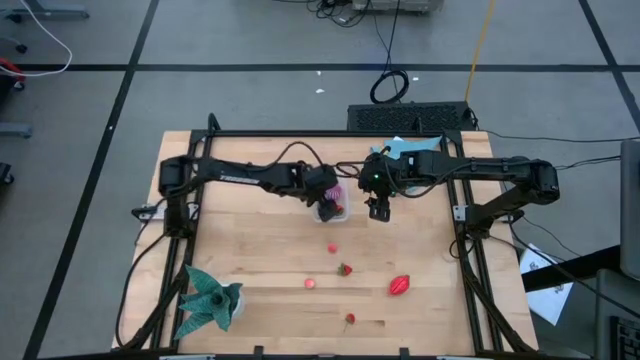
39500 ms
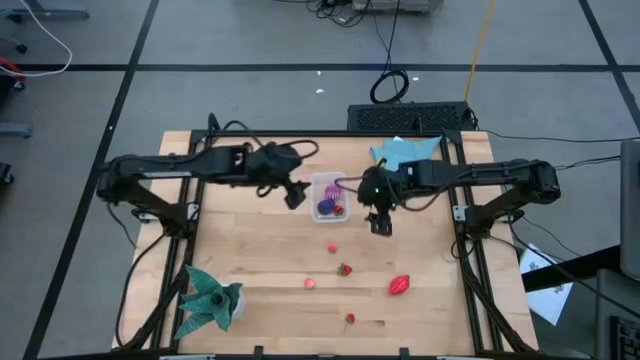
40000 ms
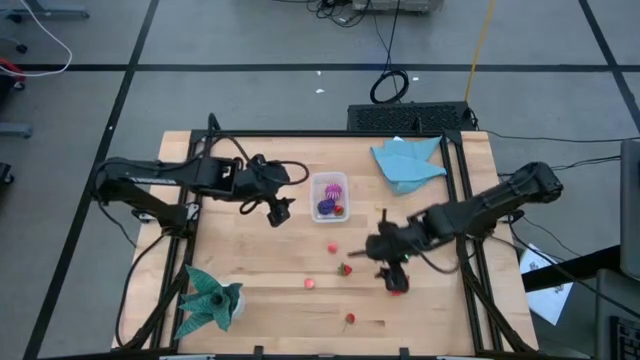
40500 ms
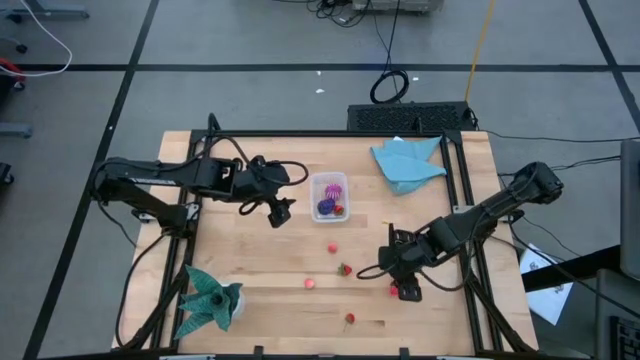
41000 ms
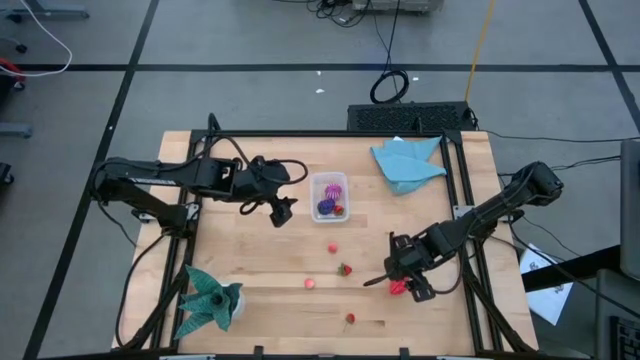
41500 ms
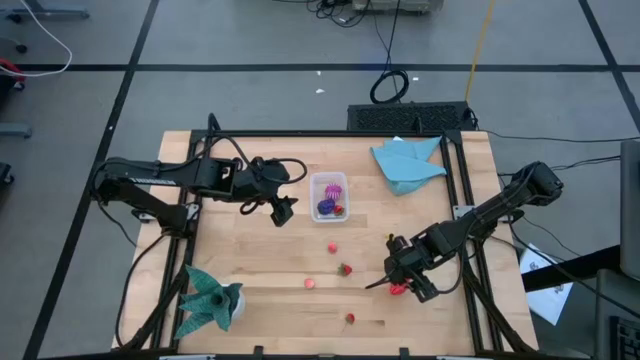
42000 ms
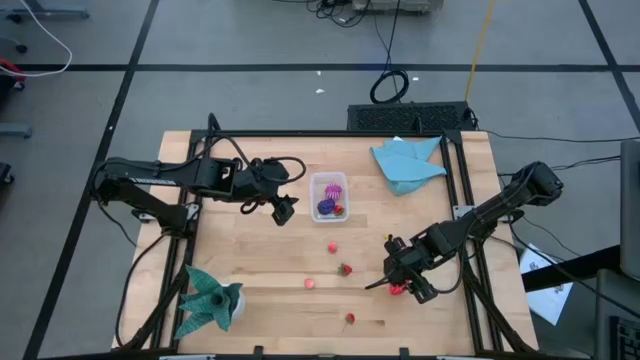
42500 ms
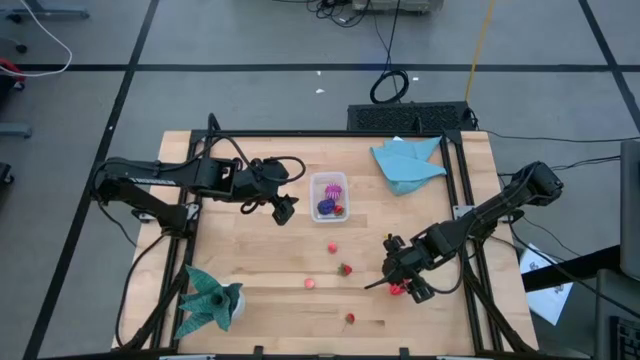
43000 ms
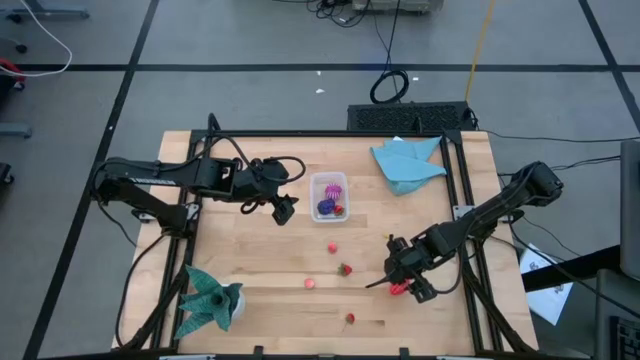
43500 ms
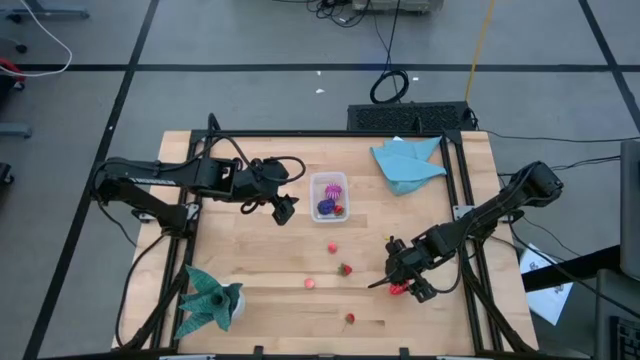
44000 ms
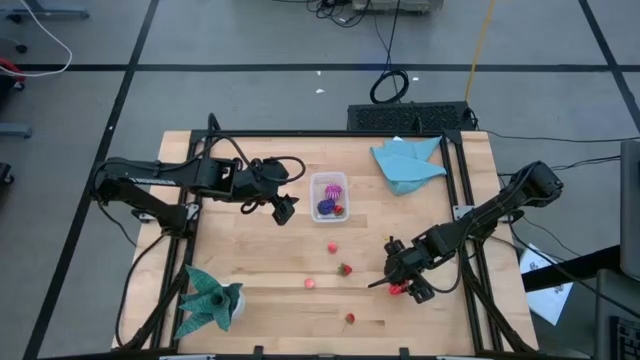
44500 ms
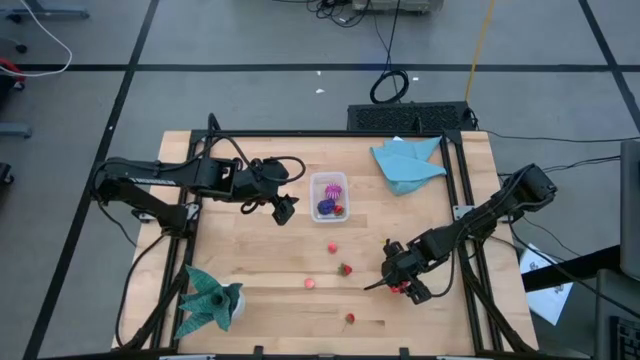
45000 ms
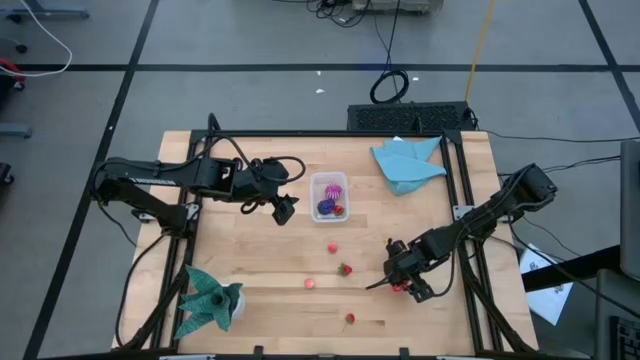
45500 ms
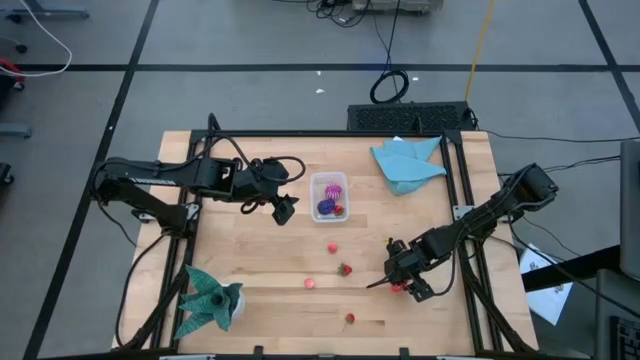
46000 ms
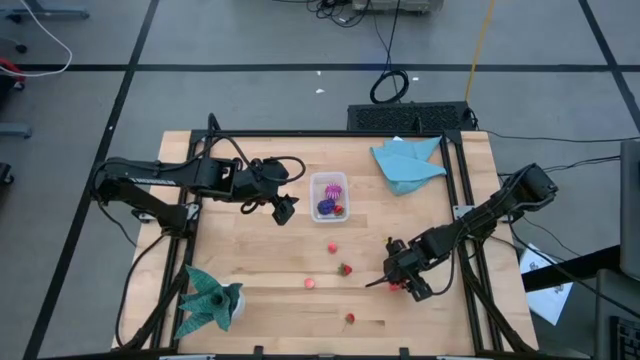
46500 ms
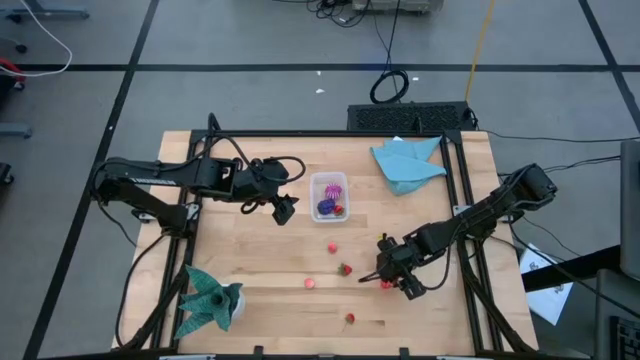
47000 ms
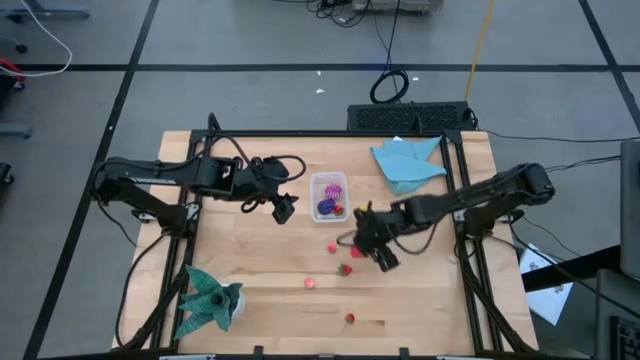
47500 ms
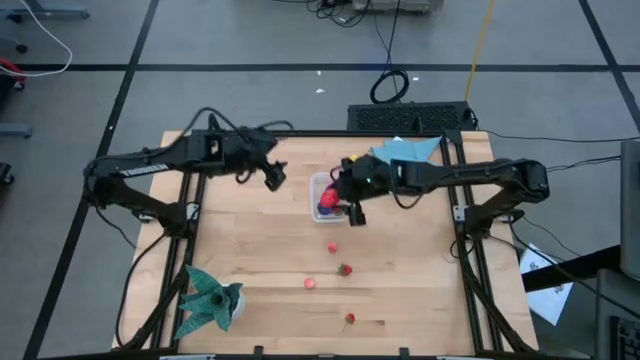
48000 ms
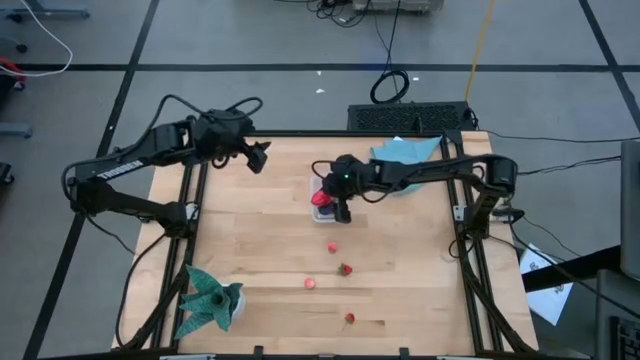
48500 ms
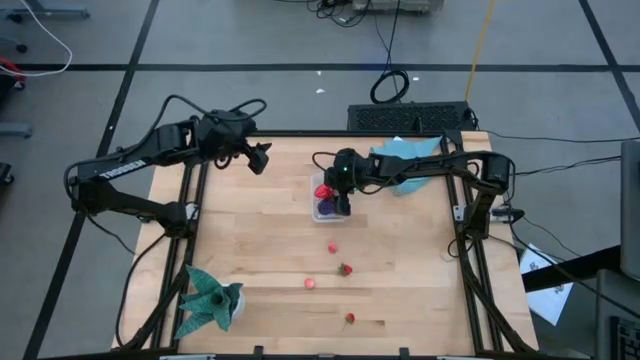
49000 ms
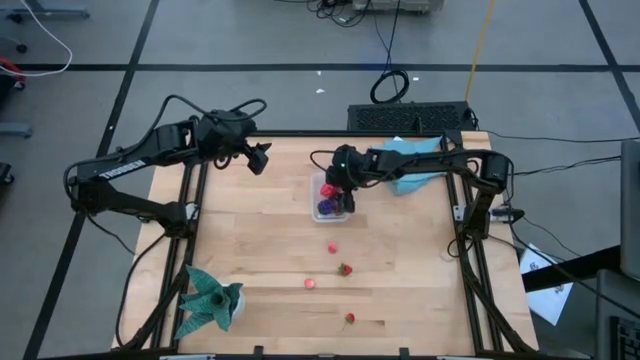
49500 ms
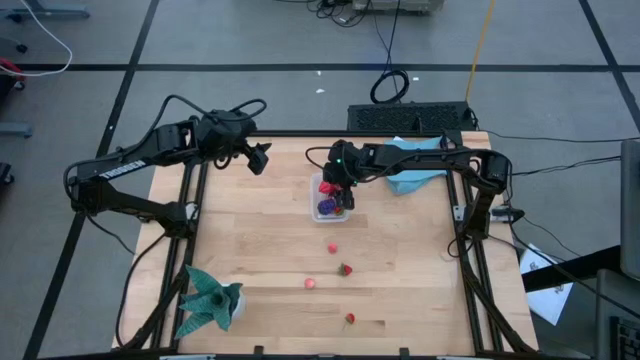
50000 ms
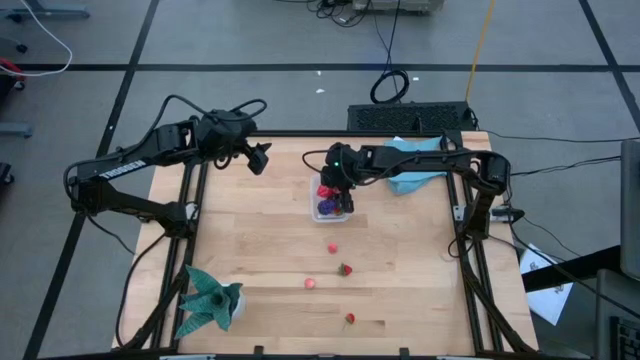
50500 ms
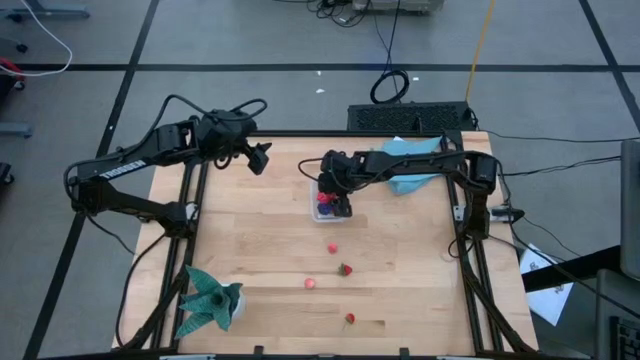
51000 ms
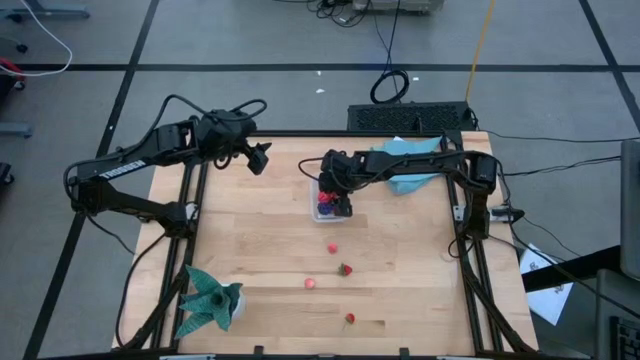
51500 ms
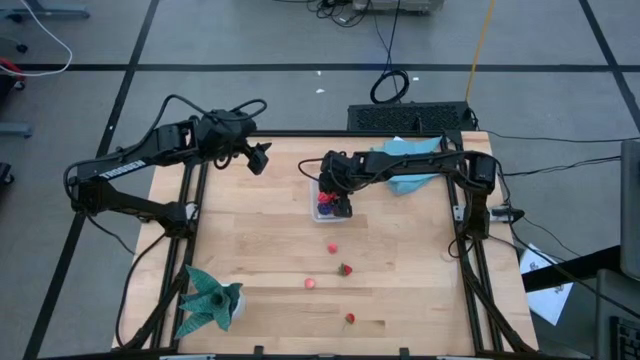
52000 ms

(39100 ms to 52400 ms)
Task: Pick and placing Produce into tupperware
Put the red dragon fruit into the transparent bin

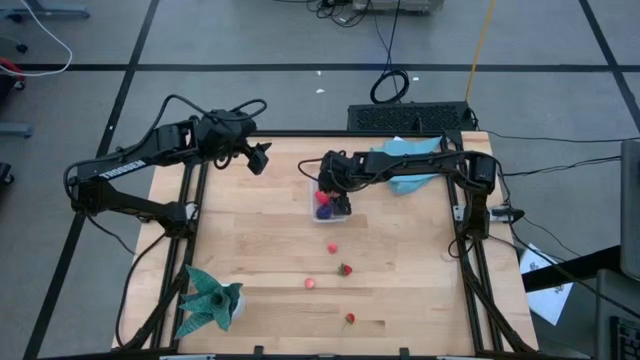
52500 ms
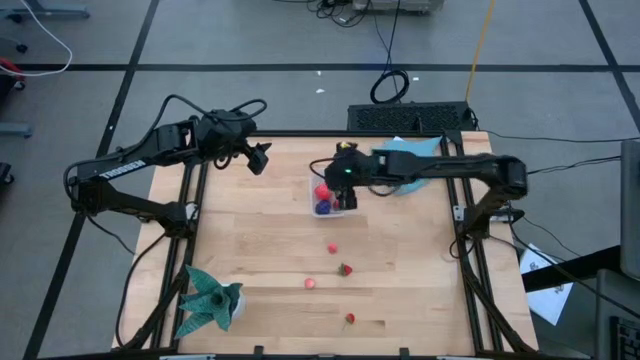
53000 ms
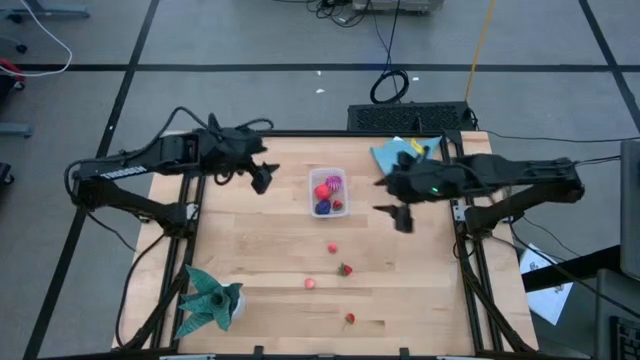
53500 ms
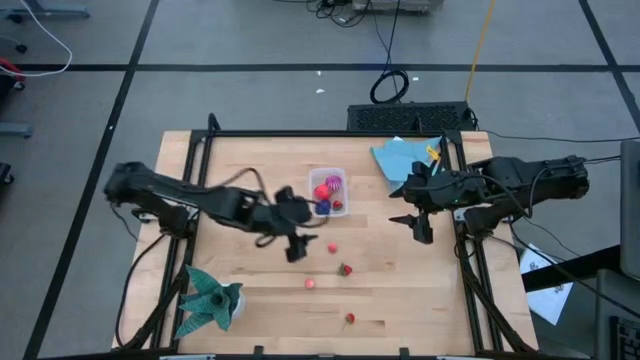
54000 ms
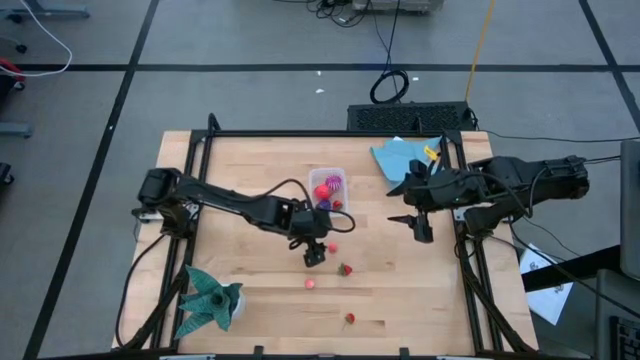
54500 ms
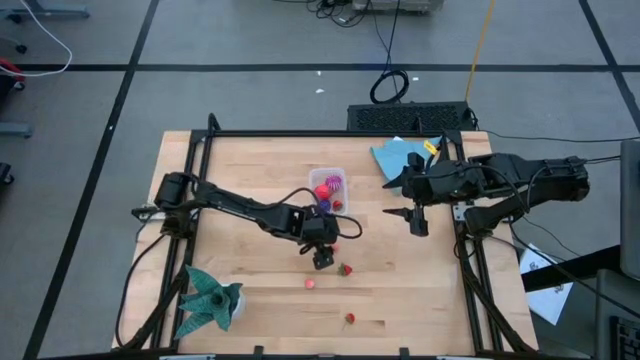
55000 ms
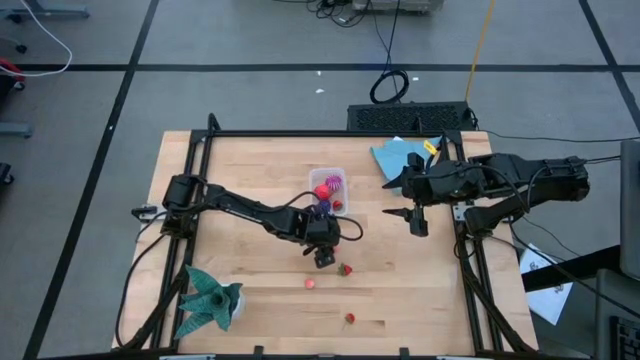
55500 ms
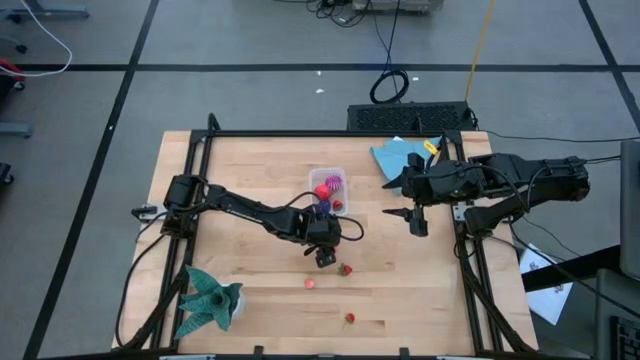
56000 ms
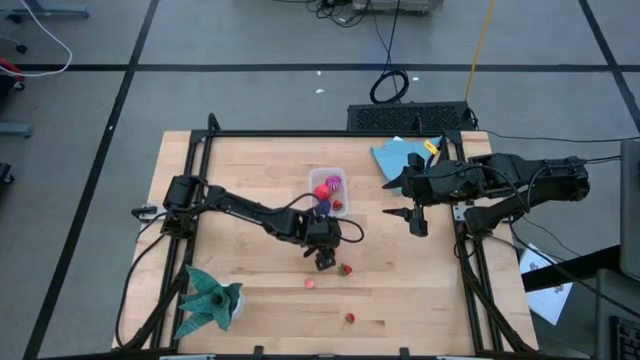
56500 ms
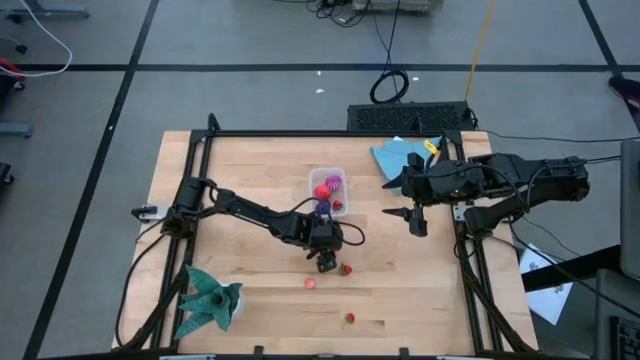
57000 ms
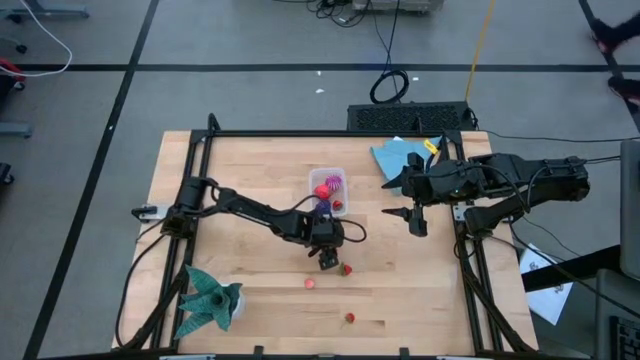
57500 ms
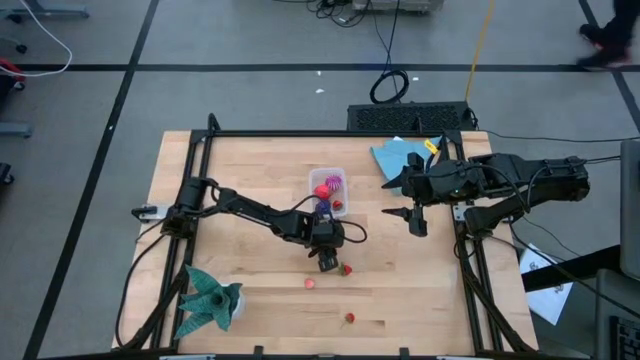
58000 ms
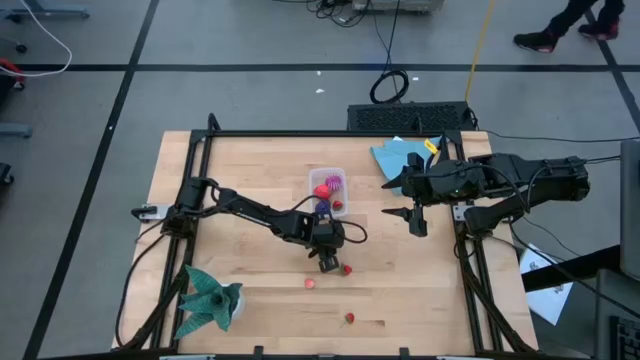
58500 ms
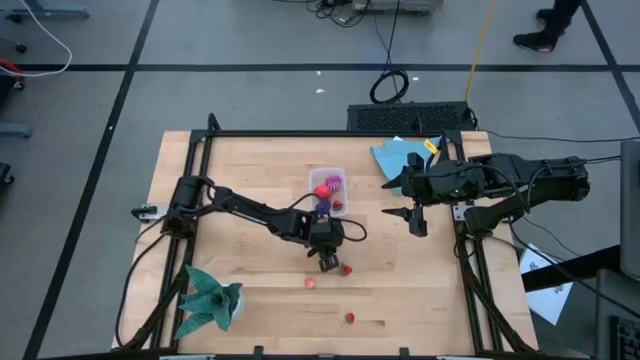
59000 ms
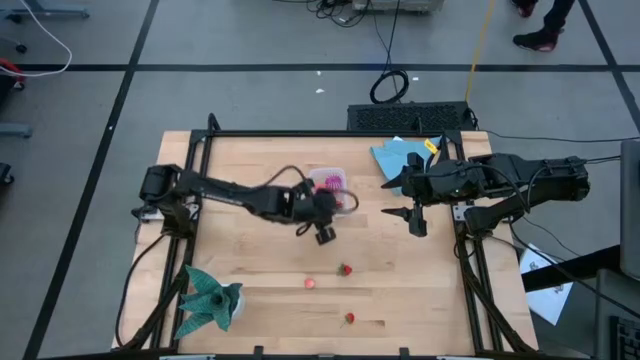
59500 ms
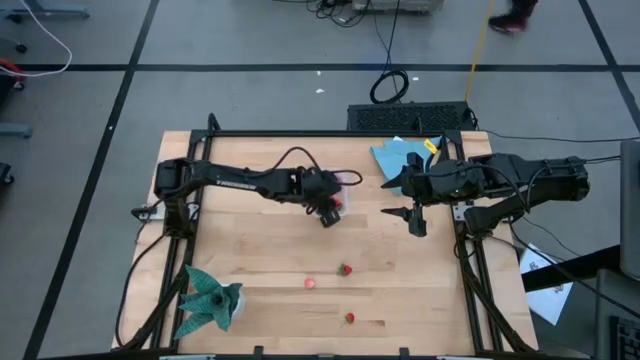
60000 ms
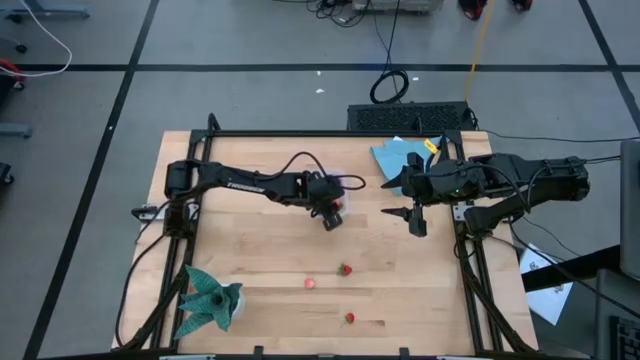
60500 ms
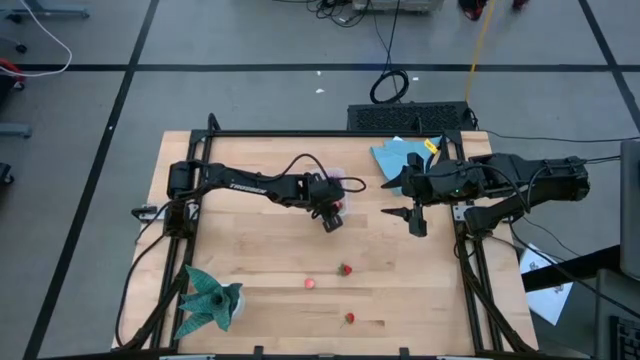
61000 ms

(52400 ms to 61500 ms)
Put the top pink peach into the transparent bin
